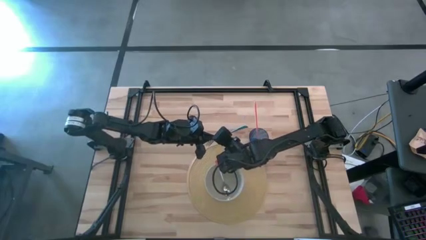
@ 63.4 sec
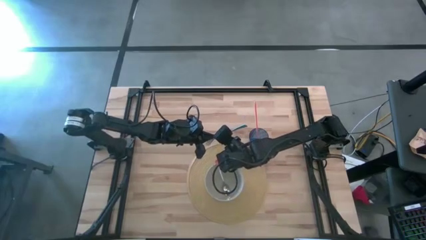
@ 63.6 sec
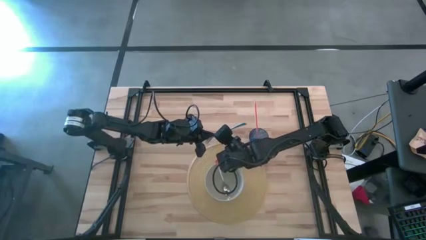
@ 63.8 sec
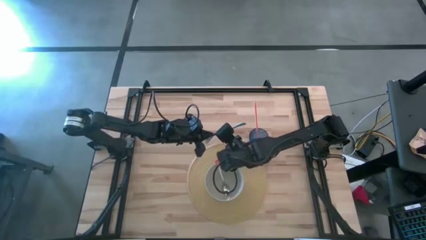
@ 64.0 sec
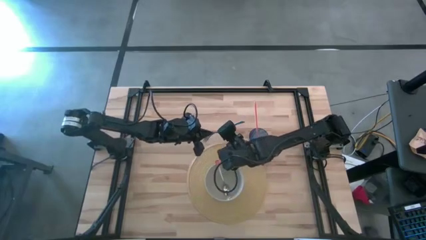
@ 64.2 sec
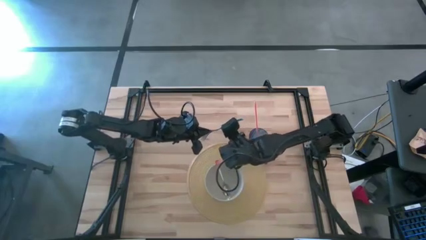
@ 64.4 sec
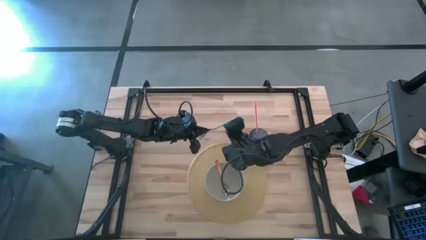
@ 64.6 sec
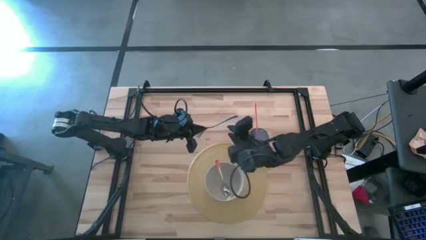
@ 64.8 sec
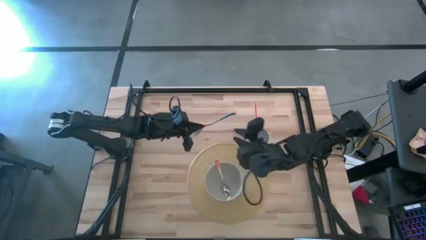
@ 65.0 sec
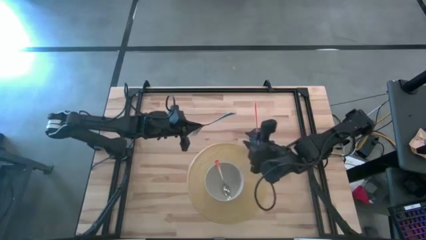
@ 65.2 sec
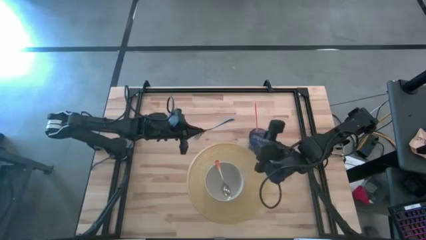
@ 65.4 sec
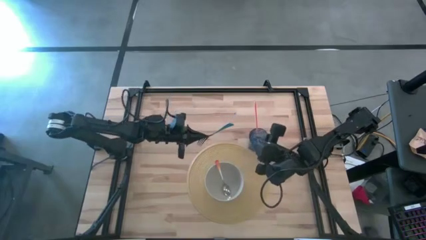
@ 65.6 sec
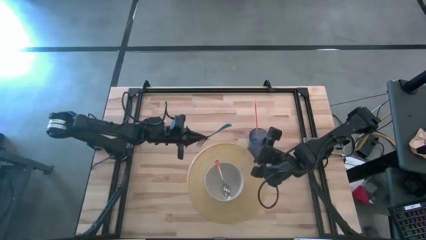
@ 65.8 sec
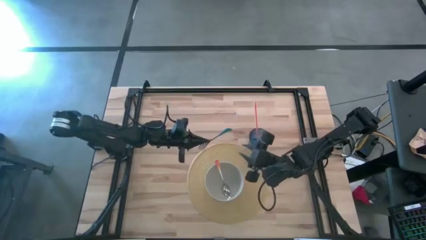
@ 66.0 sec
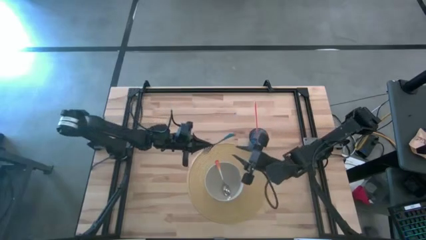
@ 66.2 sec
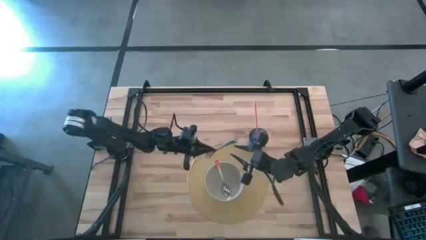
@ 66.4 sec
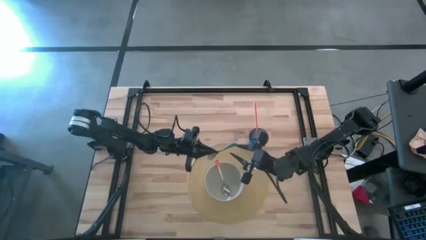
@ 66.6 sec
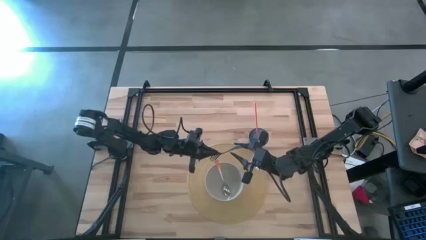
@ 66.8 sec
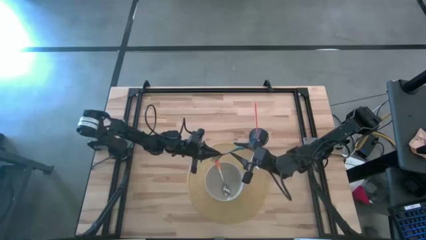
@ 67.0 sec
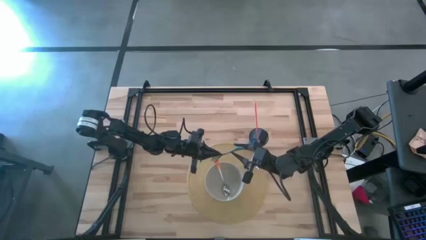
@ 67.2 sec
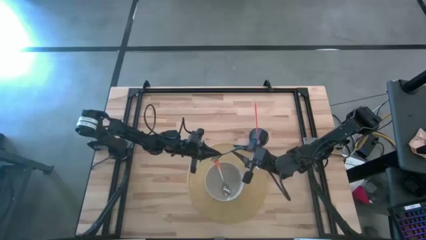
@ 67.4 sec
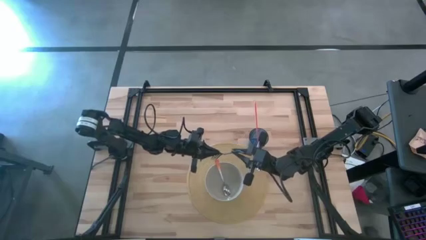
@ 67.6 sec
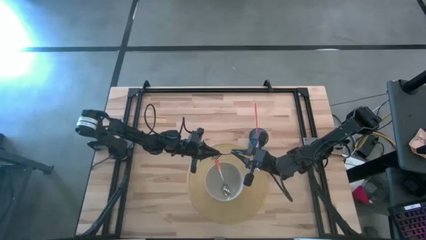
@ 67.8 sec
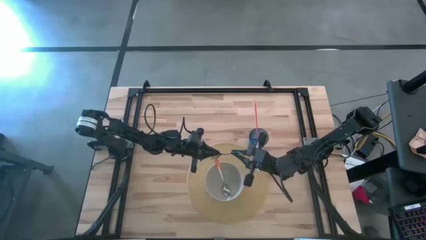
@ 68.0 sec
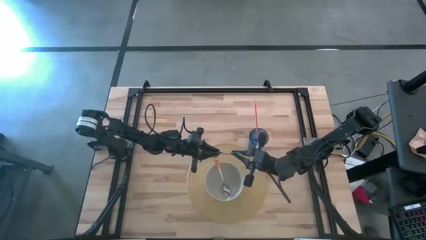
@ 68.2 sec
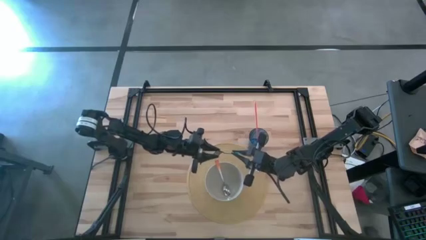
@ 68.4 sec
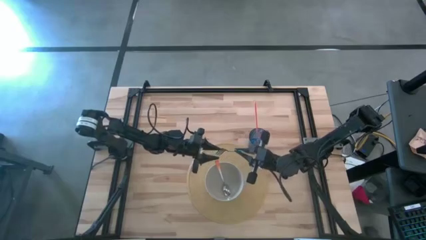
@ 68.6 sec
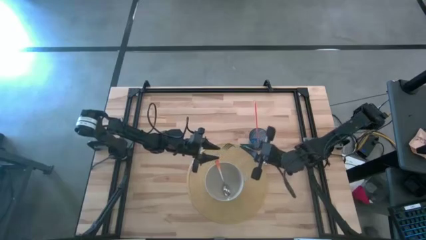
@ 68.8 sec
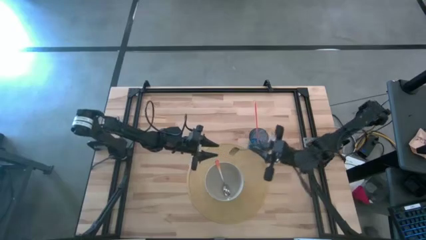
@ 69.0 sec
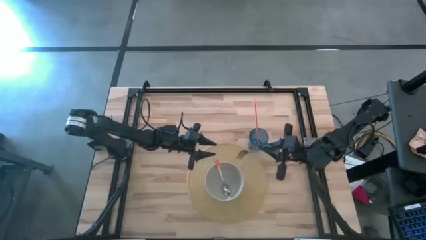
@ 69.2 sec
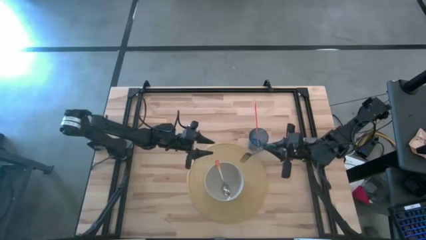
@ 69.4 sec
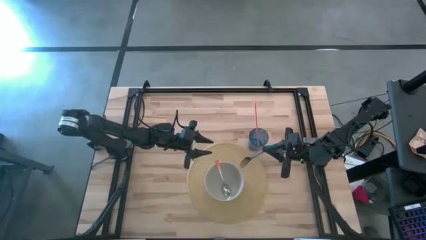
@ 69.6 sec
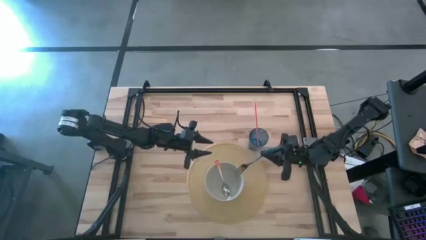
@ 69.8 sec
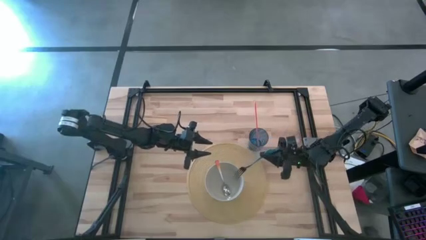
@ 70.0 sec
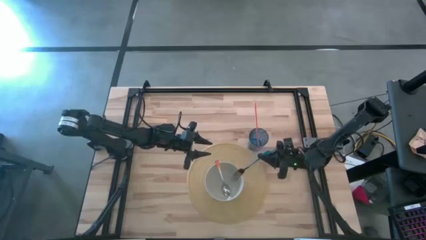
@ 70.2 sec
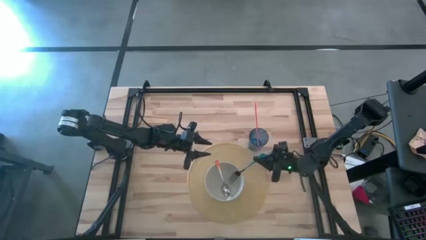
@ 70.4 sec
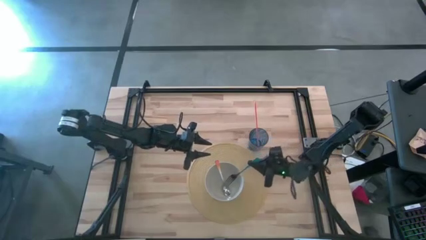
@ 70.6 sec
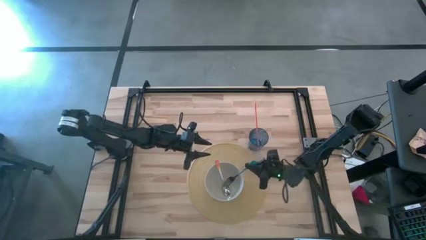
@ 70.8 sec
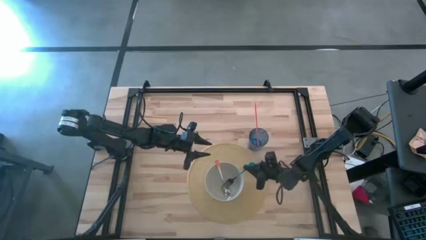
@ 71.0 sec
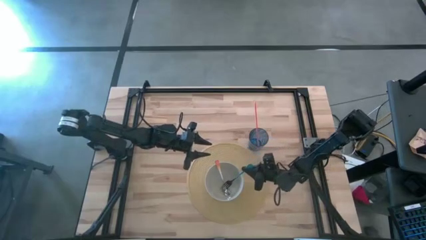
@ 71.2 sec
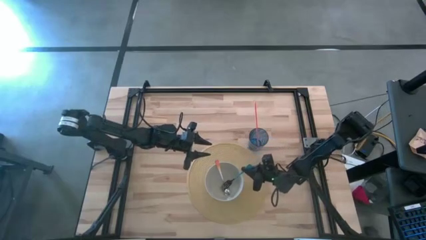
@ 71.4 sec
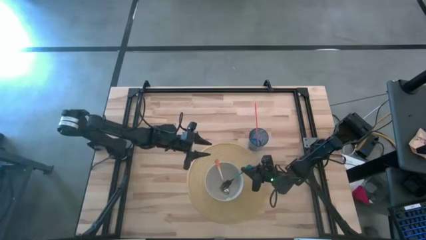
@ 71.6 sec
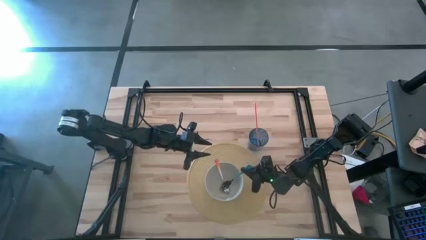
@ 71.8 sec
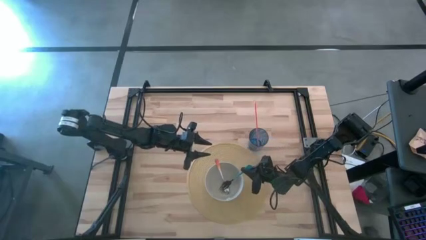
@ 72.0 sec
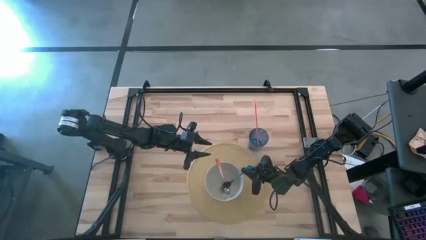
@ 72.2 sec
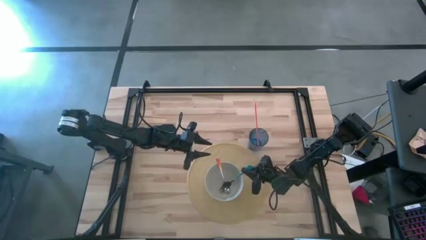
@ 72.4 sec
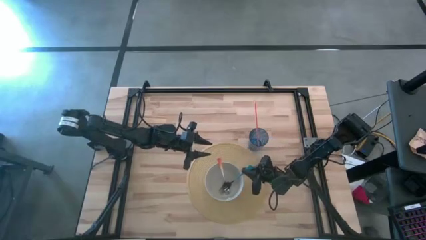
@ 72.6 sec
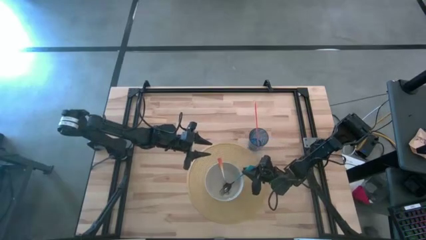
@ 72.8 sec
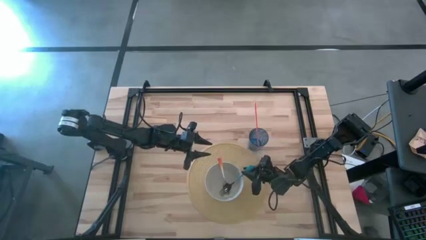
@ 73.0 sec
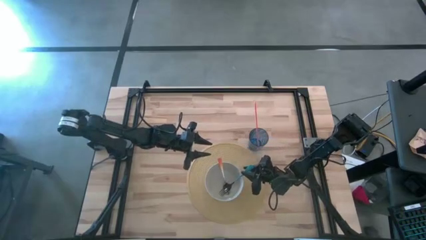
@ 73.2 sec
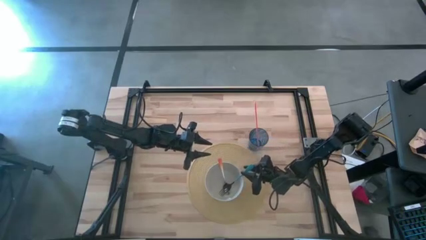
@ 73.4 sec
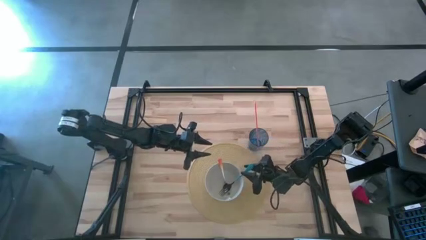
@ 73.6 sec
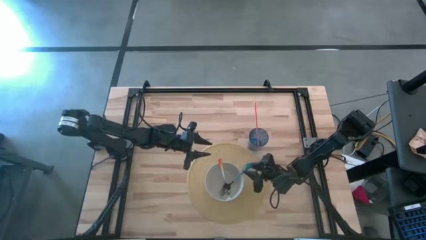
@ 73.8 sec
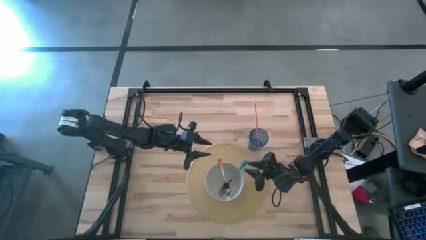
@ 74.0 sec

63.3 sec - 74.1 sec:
Task: Pick & Place Utensil
Put the orange spoon into the white bowl on the brown placemat

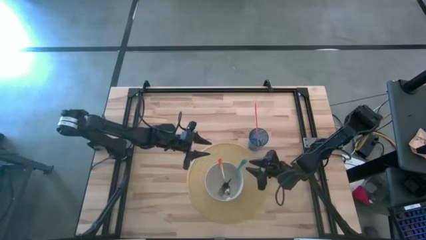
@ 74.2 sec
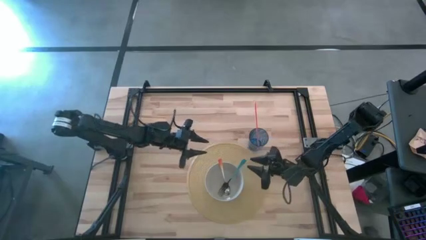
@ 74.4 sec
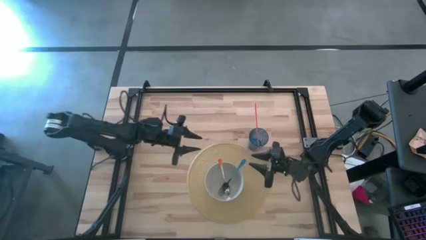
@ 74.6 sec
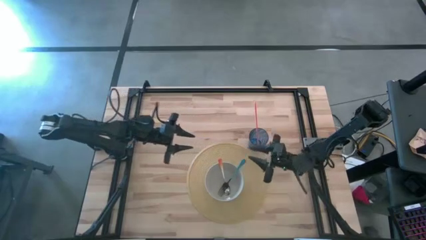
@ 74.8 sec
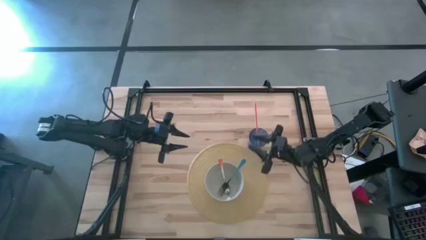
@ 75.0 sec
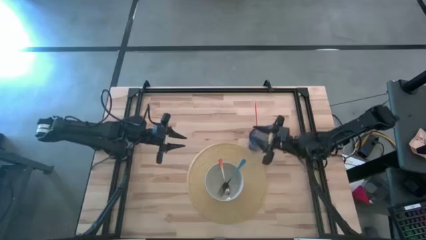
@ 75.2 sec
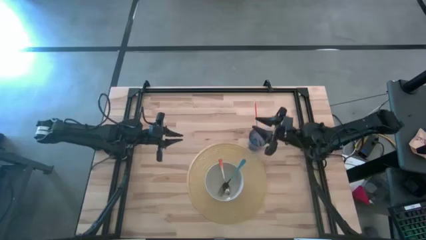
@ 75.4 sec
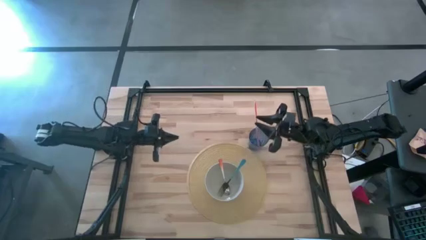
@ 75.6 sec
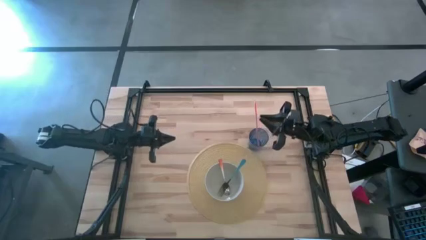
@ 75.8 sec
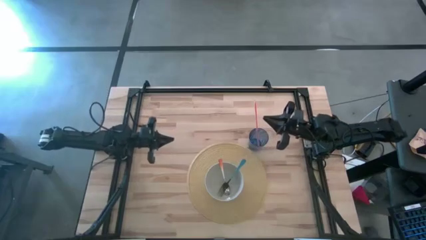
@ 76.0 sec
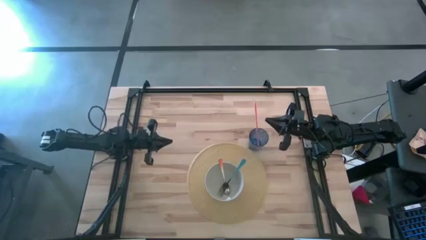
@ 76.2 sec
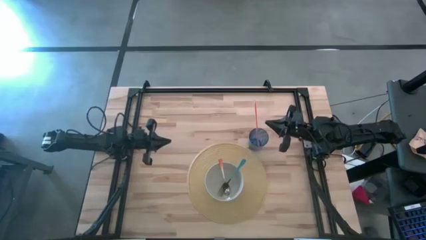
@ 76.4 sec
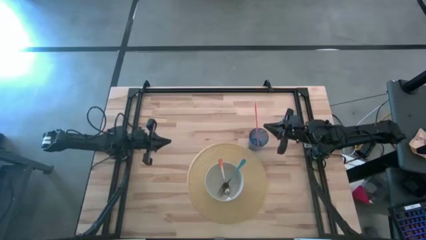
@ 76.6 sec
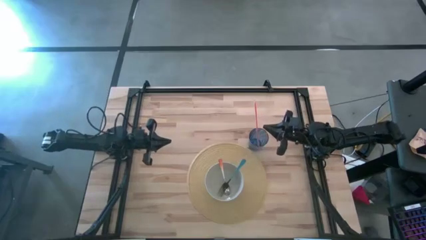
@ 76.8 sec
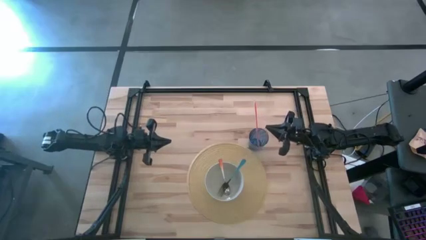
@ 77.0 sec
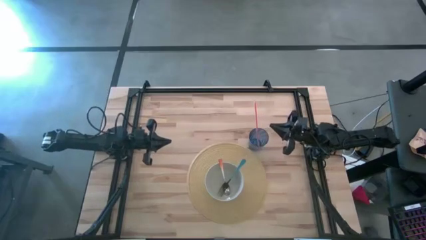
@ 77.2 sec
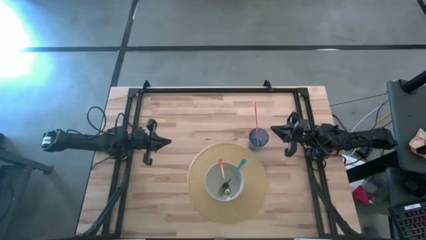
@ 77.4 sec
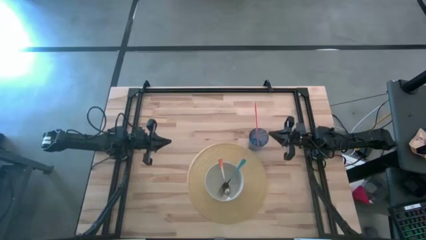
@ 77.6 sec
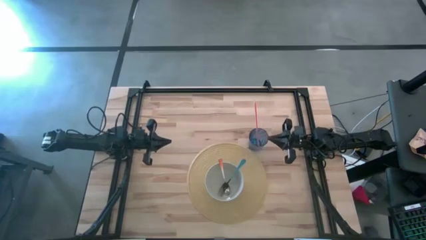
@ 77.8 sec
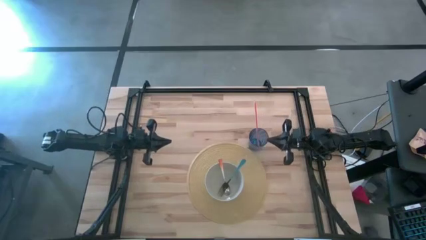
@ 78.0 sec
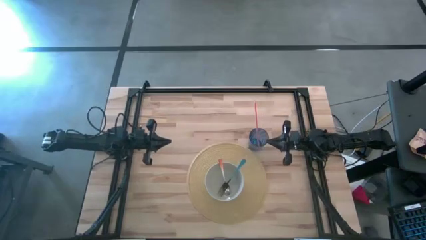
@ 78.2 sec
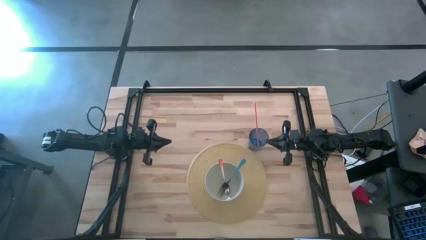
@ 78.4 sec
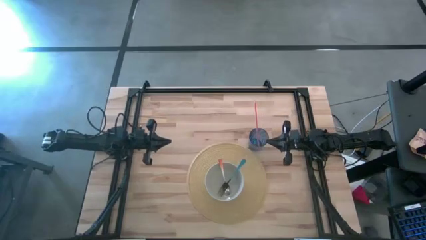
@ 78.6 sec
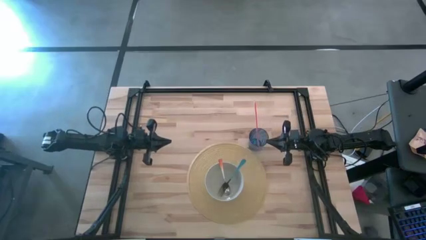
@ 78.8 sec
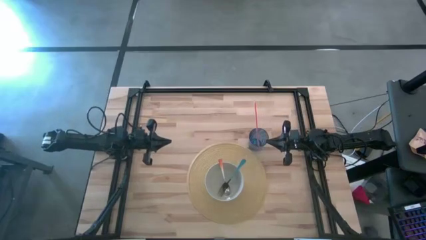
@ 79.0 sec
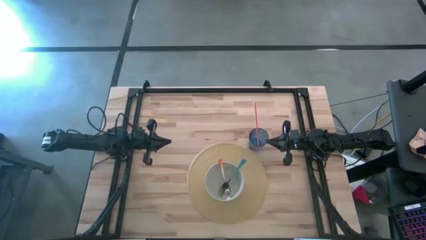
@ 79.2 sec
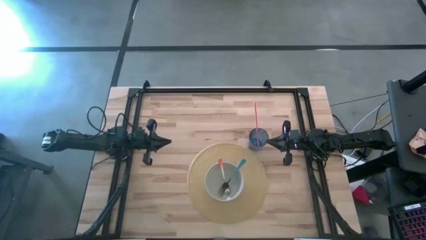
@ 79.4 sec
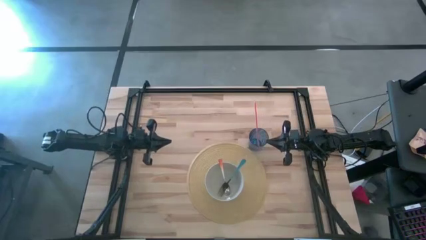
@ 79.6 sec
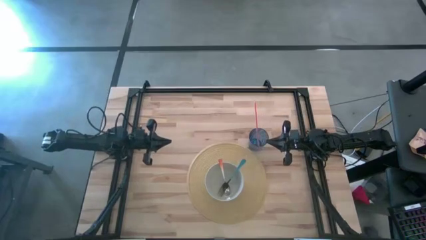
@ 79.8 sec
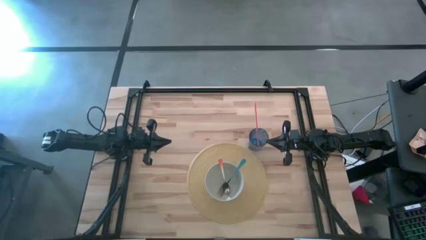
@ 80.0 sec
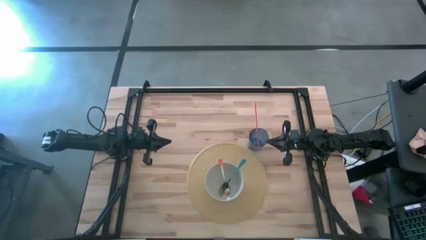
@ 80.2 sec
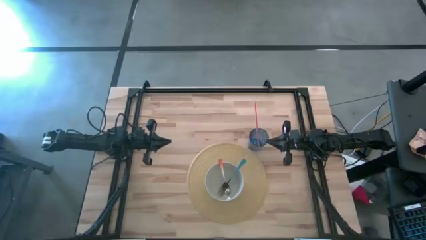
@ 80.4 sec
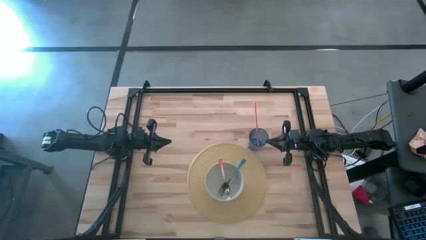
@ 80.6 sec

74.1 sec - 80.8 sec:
Return to Home Position
